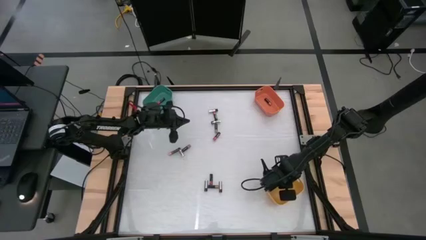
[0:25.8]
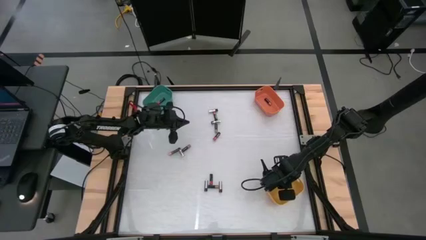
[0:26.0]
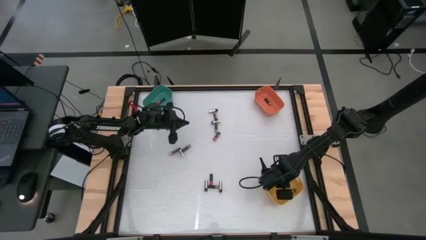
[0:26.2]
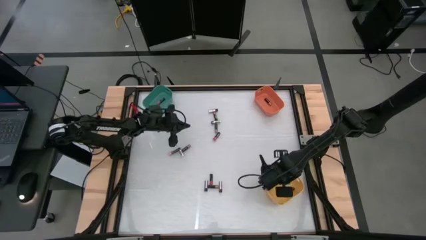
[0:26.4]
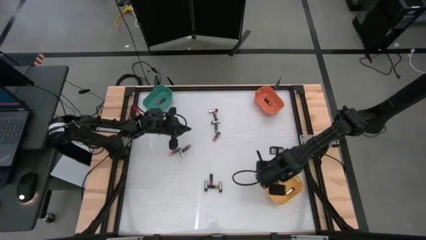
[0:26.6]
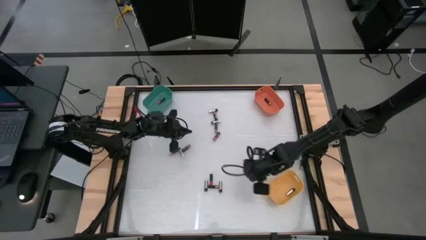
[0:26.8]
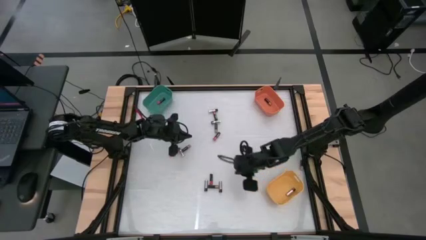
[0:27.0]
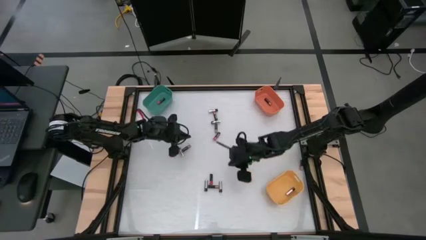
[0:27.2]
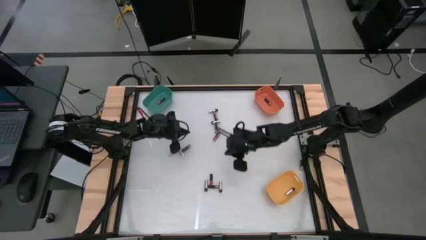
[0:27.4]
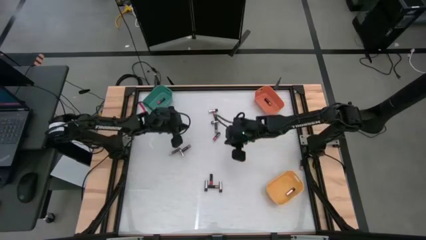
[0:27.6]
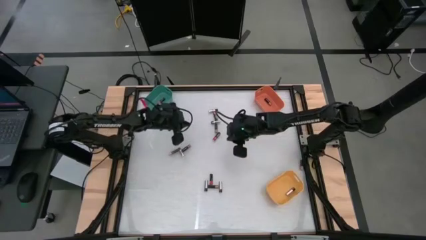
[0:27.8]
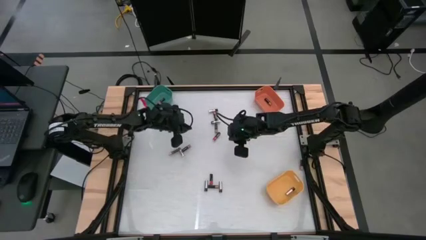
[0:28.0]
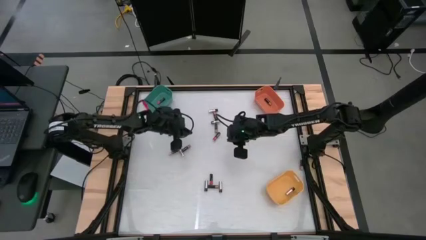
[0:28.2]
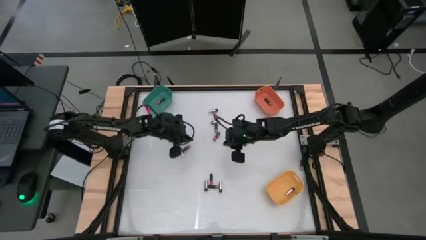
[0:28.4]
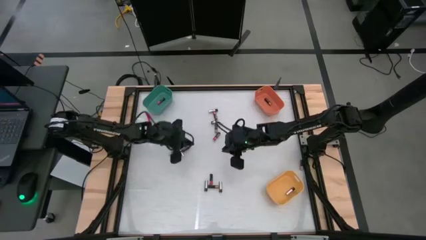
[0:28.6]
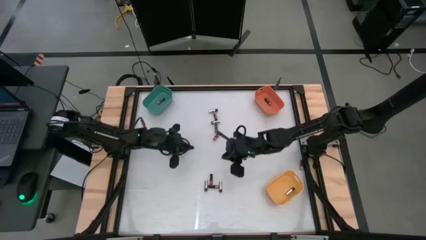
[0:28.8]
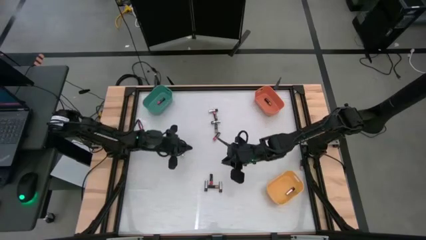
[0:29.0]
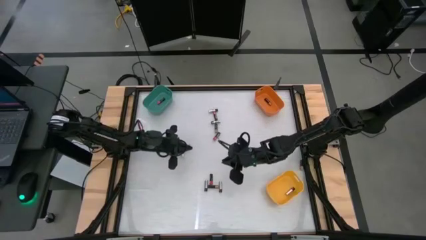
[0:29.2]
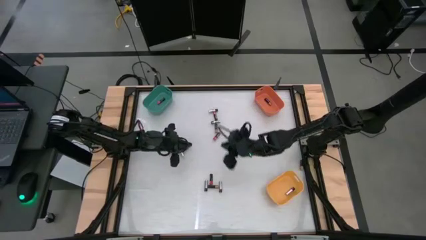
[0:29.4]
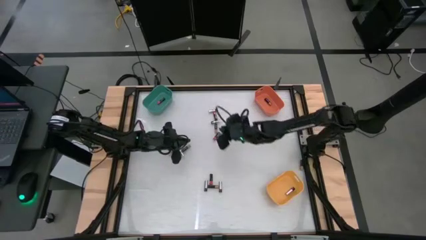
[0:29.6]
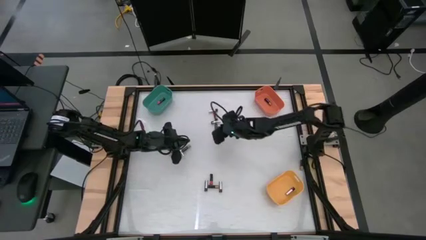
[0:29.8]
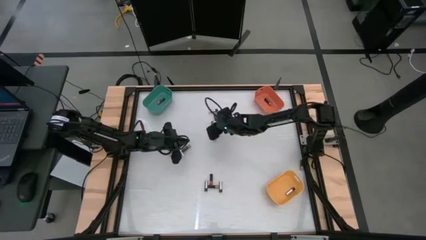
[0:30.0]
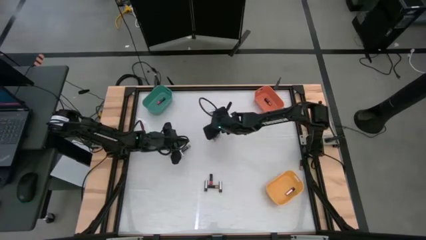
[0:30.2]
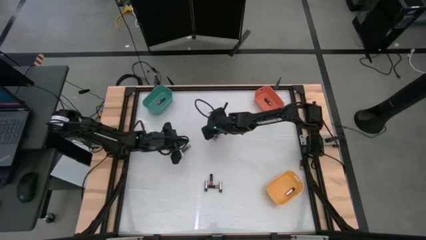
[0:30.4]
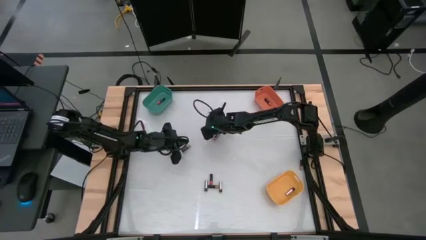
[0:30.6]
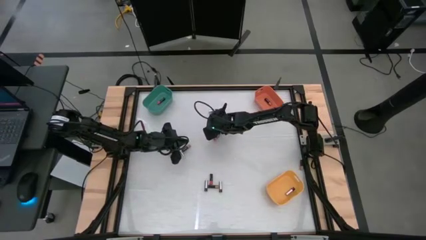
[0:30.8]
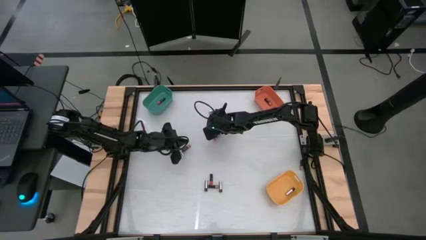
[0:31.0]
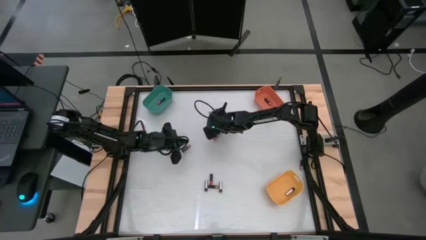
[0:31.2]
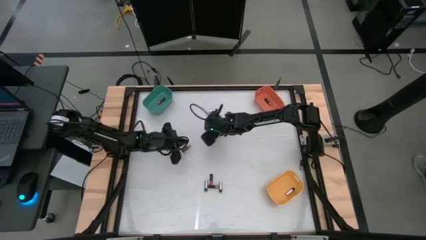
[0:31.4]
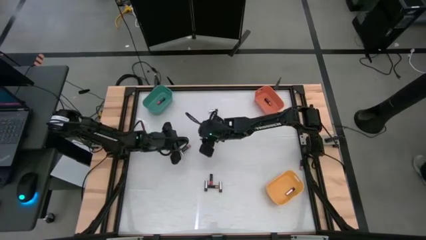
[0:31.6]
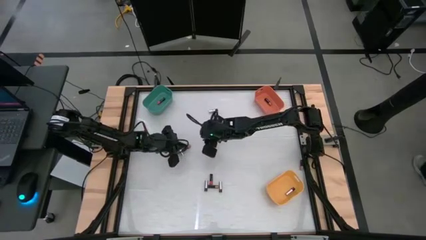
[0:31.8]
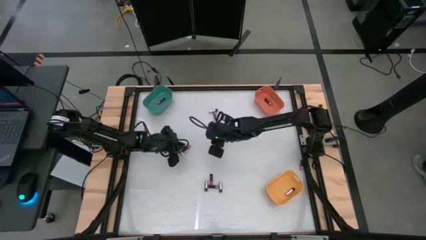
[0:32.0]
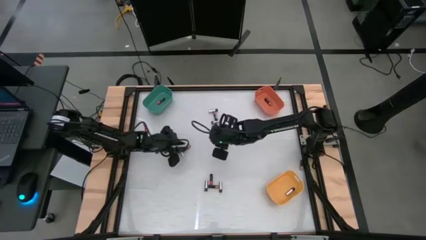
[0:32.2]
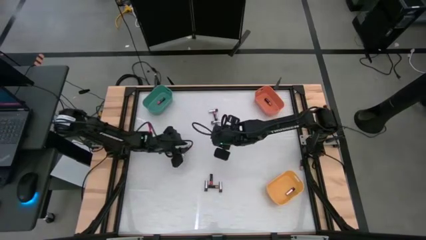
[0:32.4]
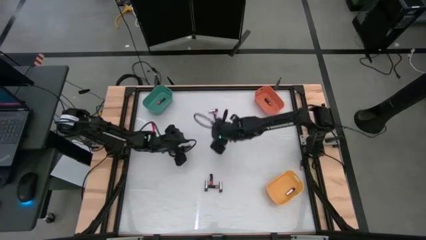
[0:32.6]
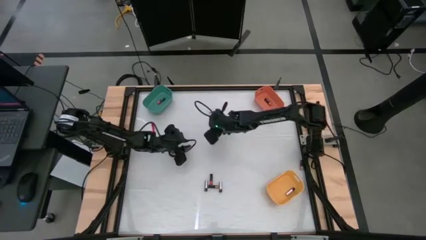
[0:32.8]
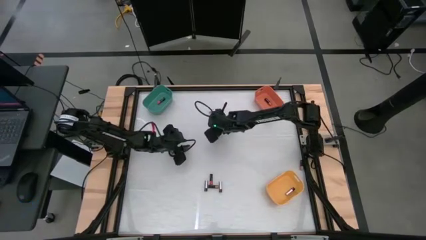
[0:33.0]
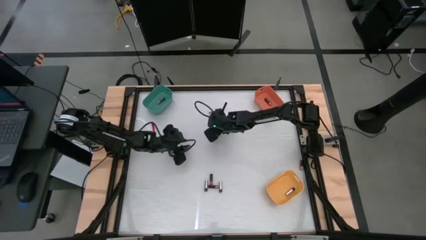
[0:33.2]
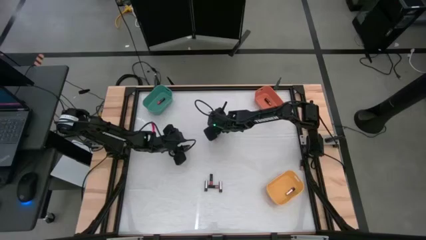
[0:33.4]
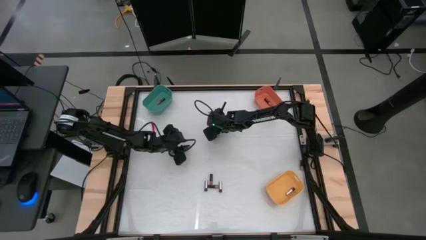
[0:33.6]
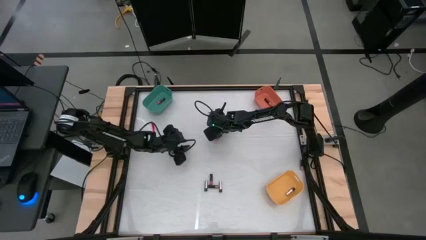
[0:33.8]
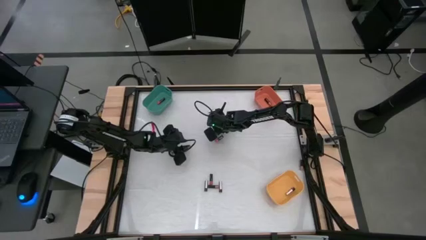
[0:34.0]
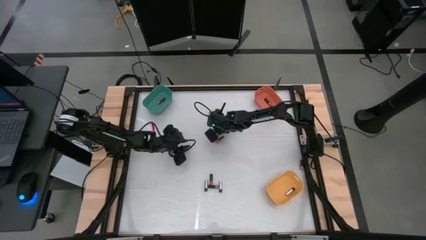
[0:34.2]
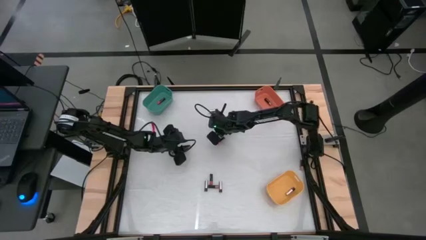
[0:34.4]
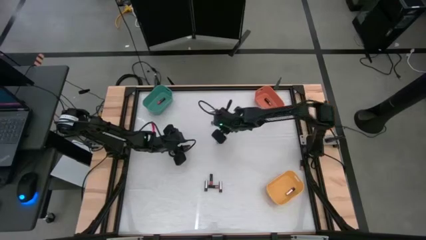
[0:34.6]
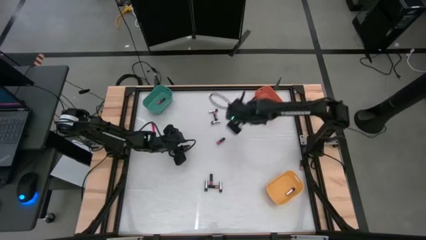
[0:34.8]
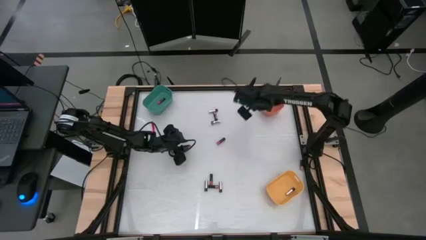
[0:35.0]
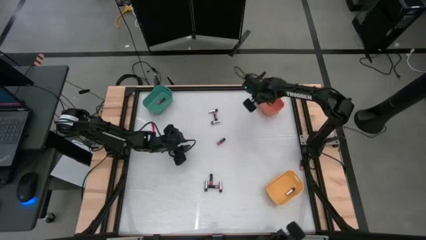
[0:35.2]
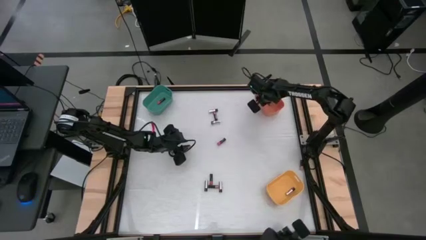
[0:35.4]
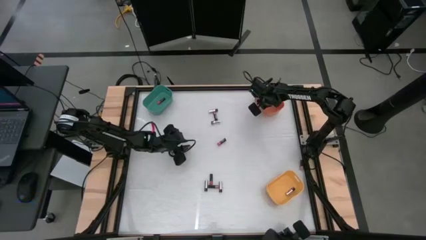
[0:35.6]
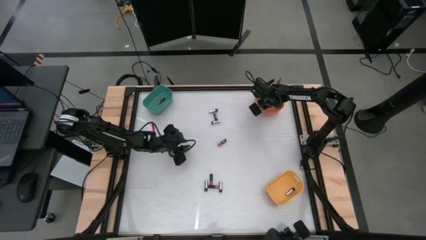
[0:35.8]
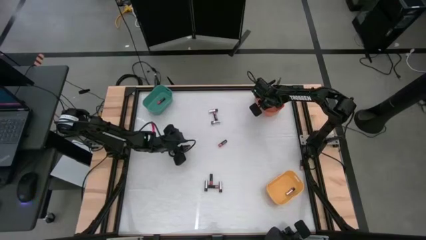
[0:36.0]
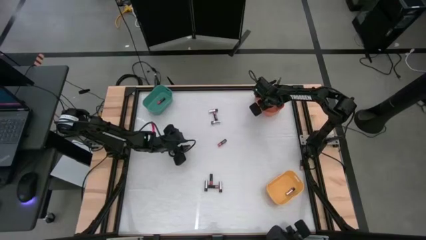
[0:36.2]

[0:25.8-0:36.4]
Task: Sort batteries
Put the black battery into the orange bin

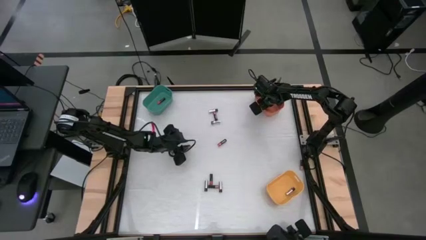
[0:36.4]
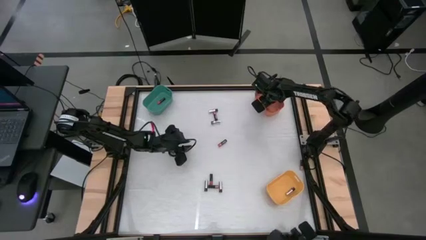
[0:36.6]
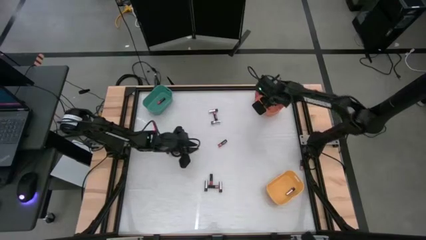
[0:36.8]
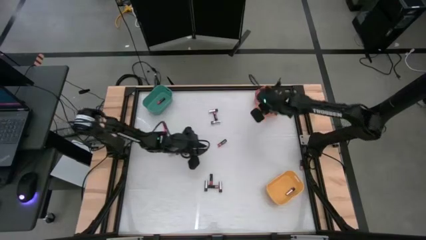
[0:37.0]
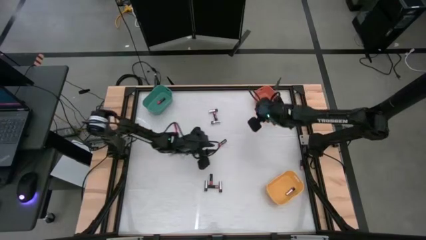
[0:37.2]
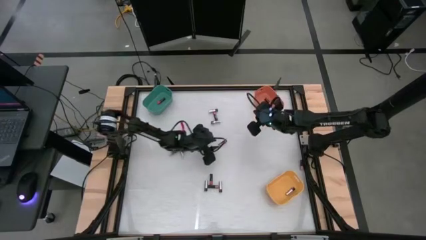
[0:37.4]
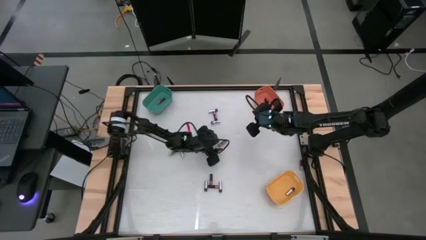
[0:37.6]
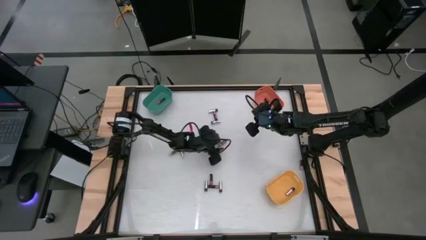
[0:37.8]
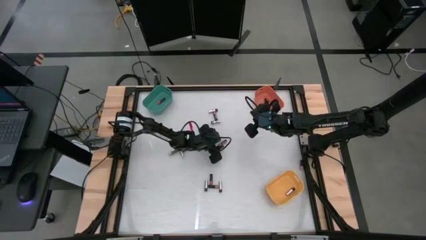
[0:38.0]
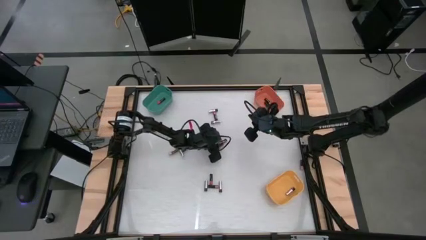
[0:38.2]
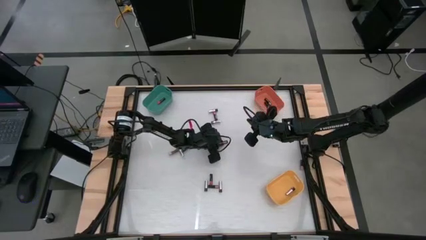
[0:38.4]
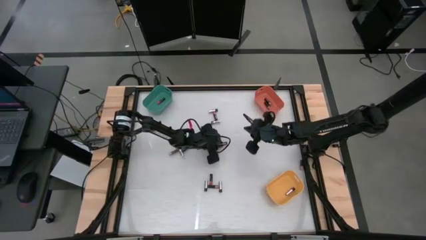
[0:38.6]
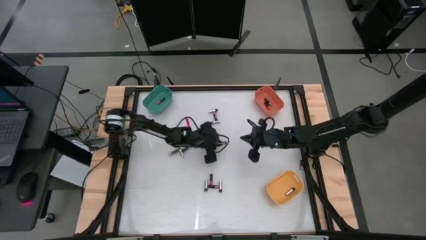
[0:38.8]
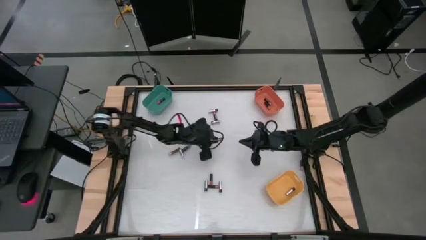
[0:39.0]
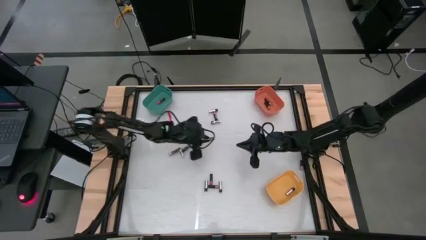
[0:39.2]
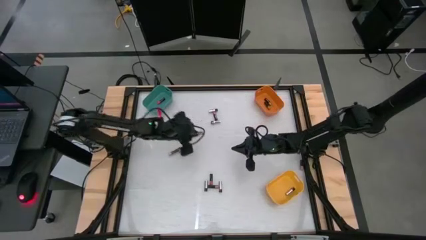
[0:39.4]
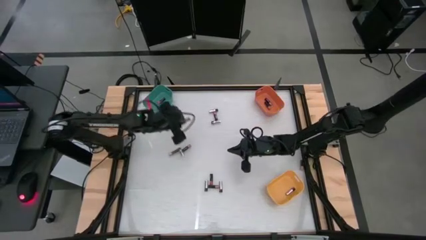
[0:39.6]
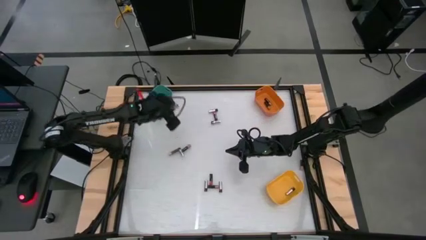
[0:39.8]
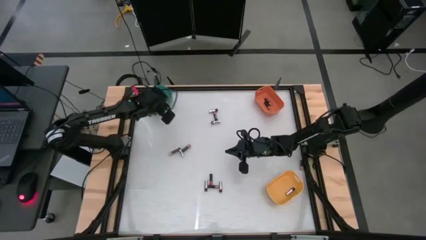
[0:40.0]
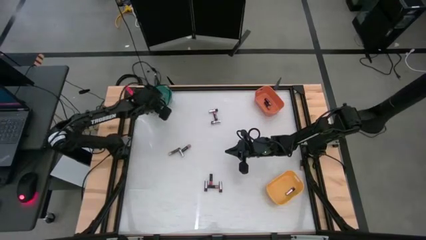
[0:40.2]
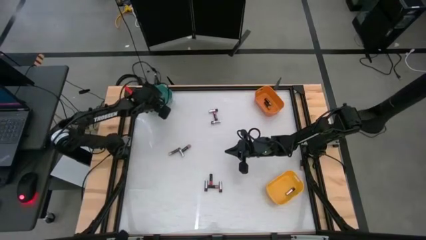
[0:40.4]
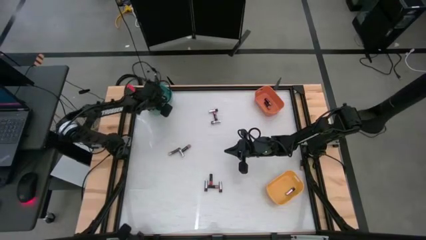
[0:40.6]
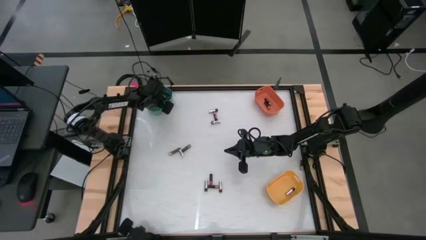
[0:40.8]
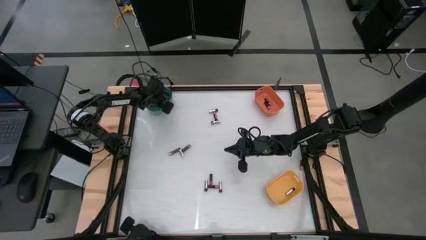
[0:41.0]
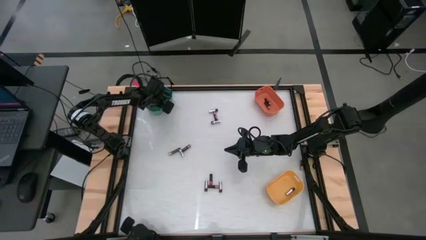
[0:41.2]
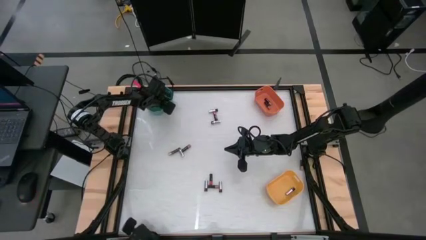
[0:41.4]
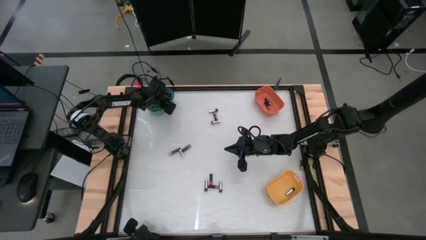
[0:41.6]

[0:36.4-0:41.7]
Put the red battery into the green bin
